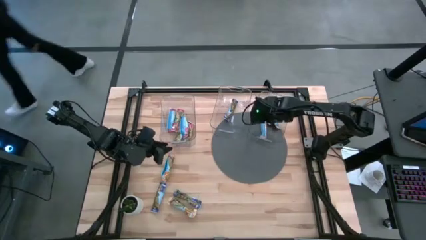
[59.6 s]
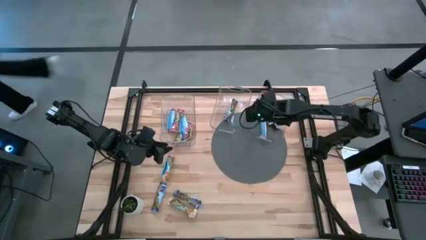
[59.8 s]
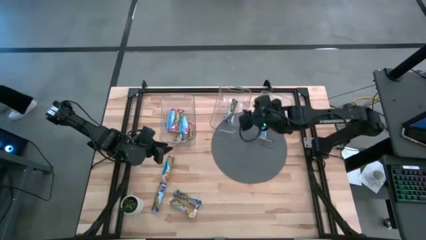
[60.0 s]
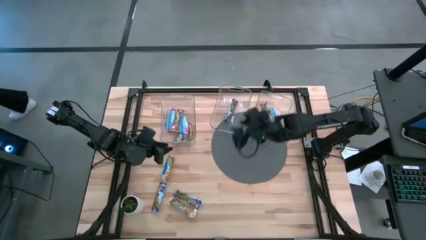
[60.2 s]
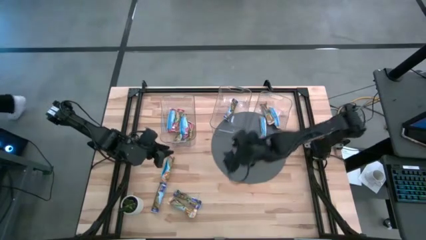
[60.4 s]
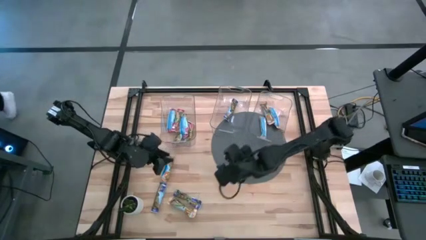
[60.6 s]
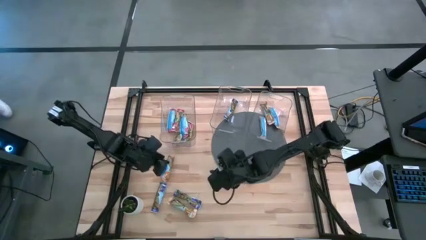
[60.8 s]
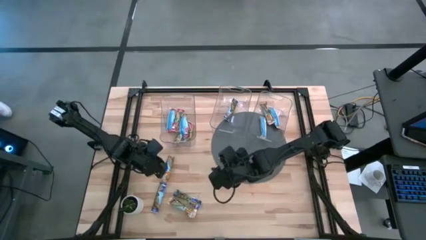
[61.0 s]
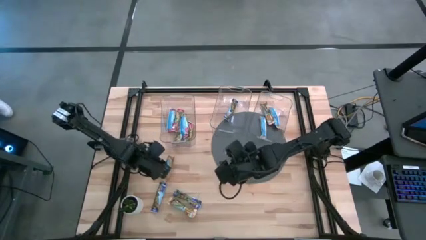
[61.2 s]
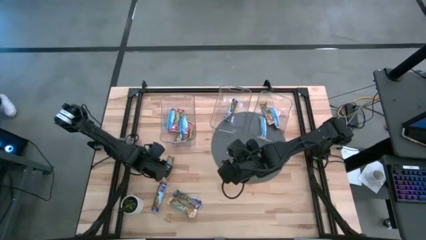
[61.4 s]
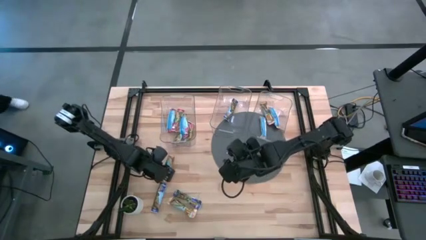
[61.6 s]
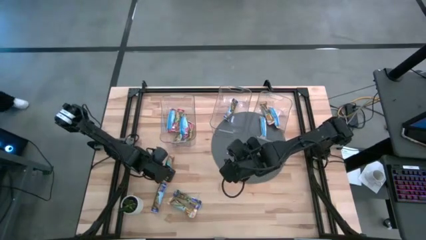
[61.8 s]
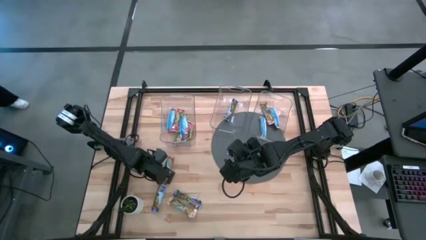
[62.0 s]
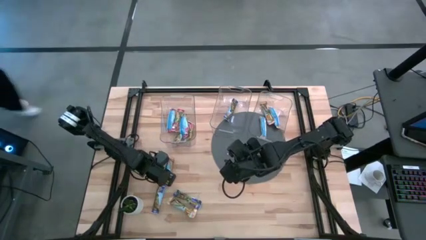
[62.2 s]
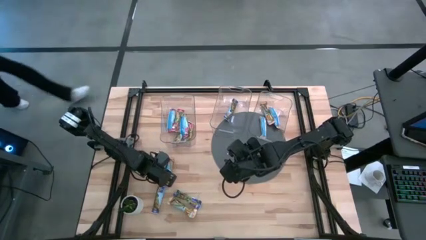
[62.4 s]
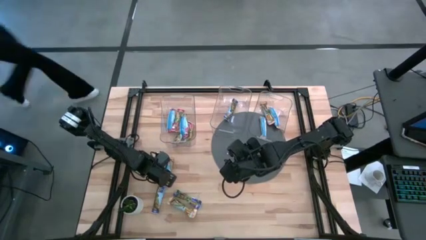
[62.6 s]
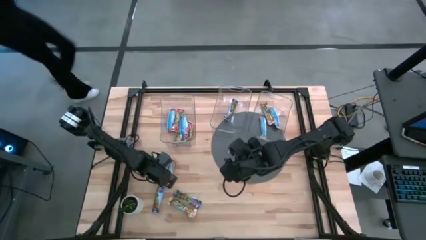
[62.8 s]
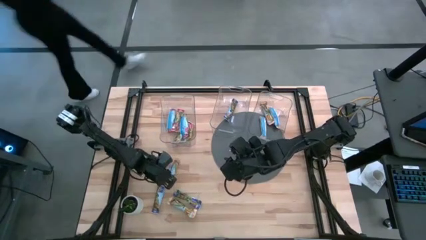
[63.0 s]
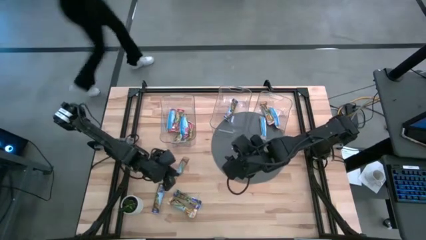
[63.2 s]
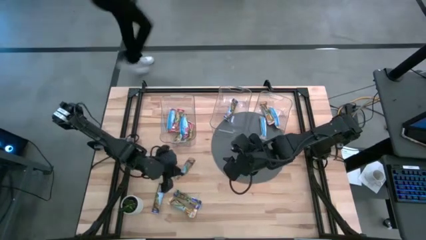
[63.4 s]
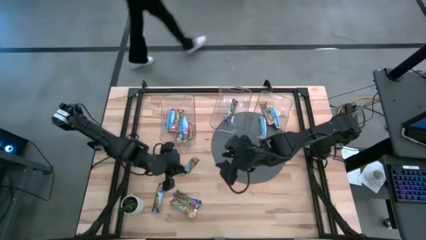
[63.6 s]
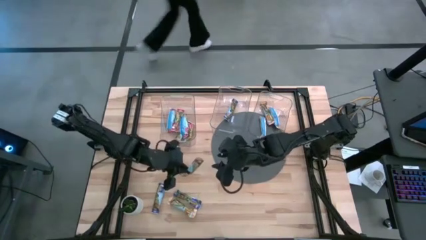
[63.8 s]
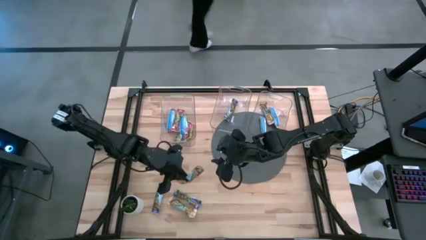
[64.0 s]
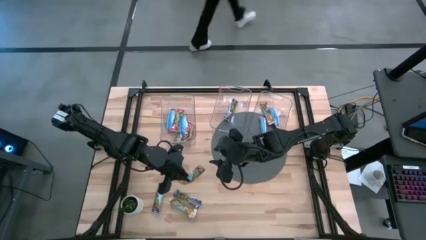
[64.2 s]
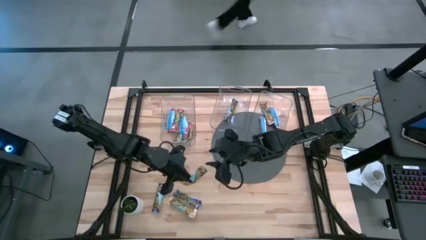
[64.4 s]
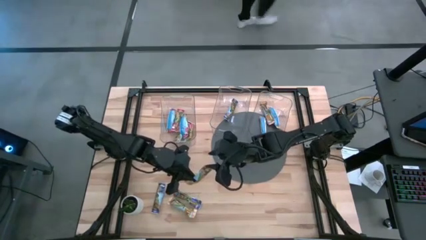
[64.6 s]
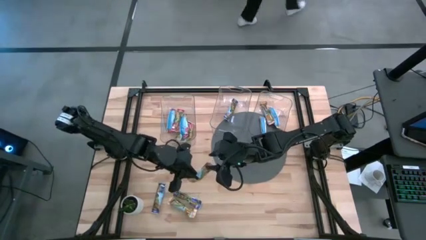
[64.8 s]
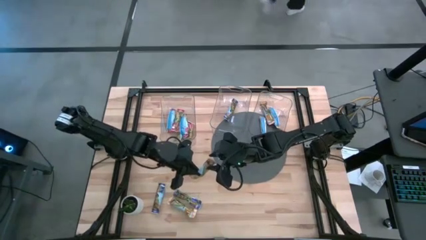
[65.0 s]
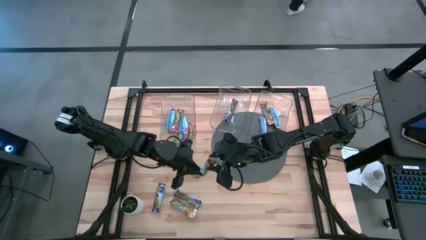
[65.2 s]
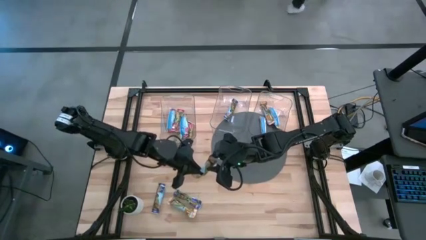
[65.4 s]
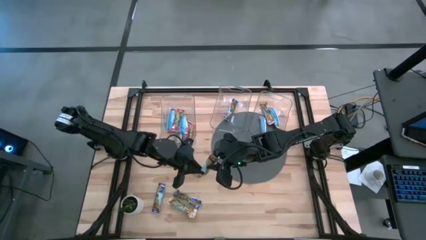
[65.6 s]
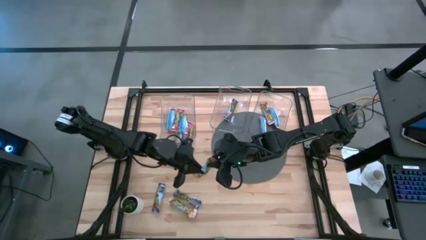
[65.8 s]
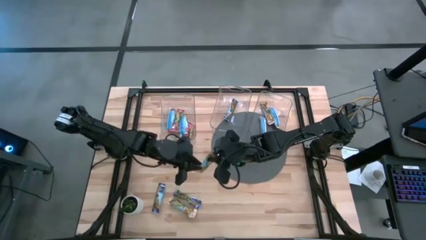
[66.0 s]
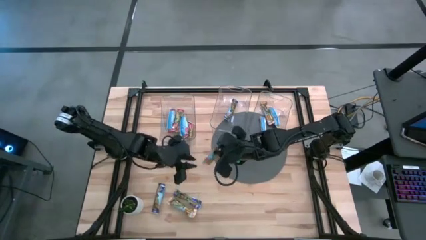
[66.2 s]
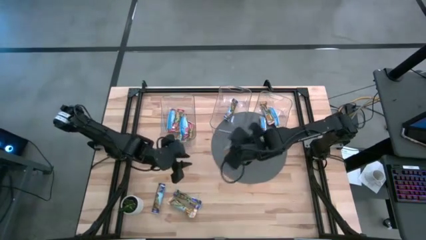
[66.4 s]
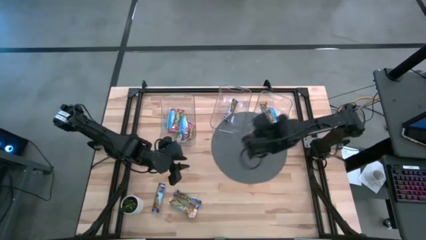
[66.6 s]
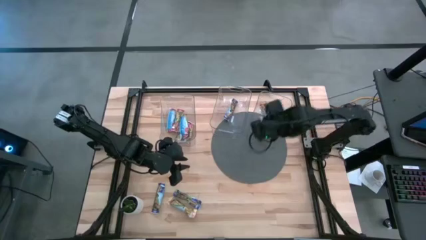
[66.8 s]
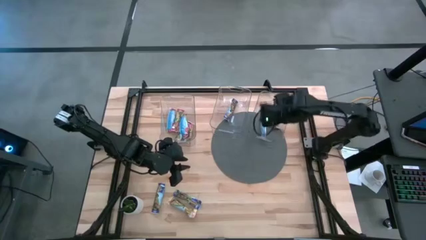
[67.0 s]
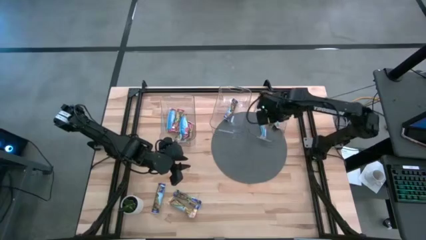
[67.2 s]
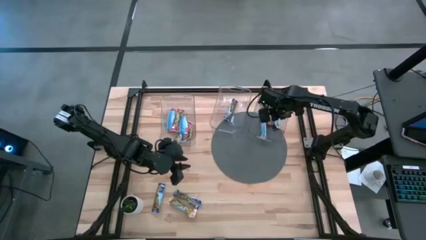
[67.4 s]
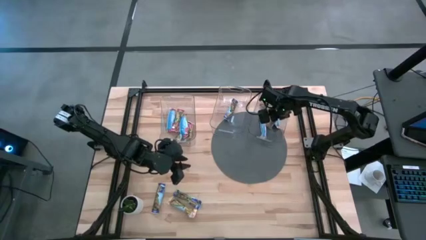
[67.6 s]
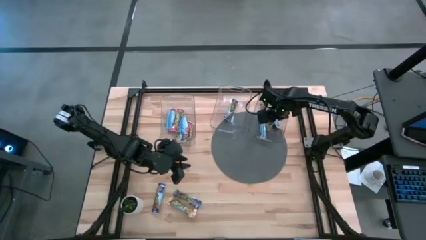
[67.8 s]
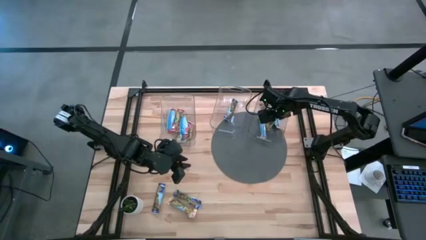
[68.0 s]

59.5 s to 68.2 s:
Task: Pick and place Granola Bars by type
Put the yellow granola bar into the right transparent bin

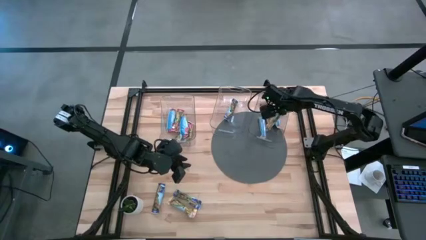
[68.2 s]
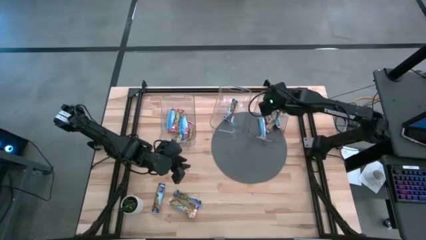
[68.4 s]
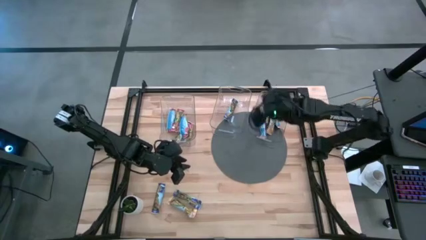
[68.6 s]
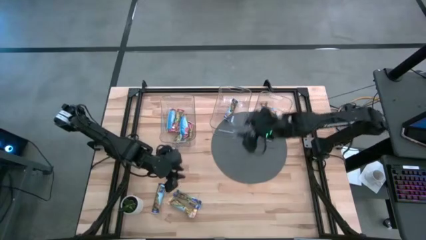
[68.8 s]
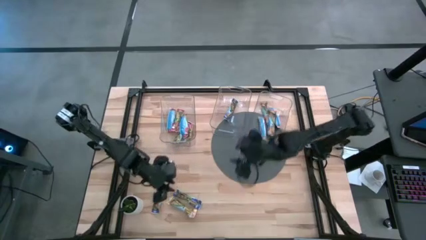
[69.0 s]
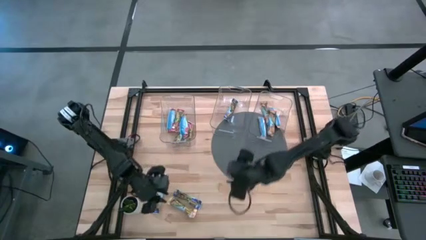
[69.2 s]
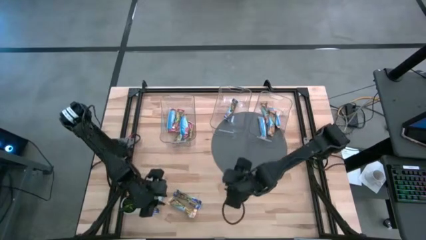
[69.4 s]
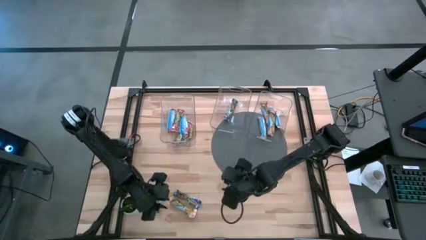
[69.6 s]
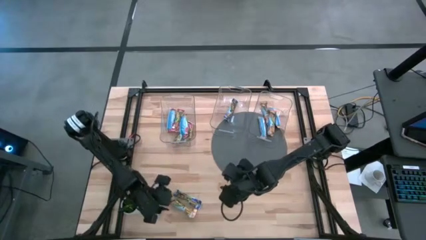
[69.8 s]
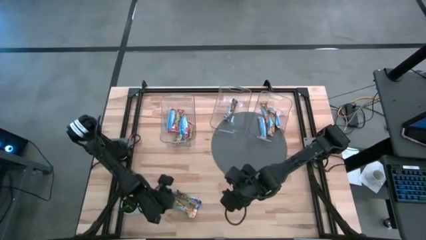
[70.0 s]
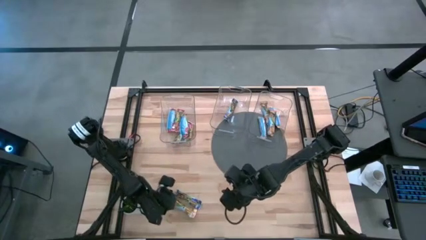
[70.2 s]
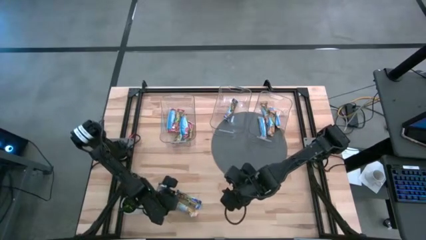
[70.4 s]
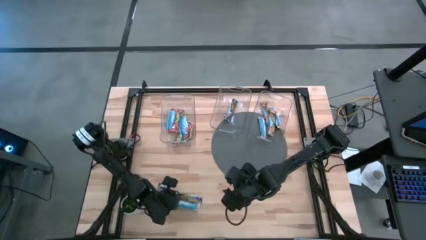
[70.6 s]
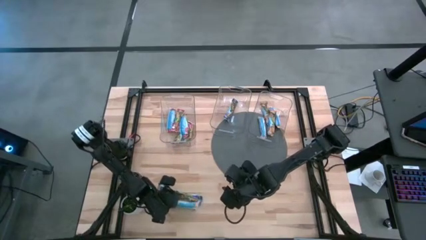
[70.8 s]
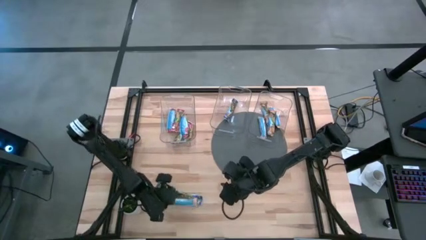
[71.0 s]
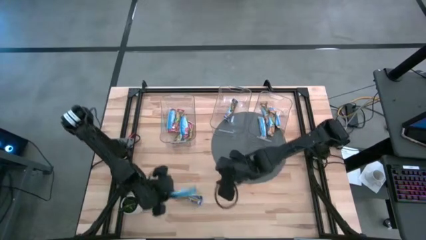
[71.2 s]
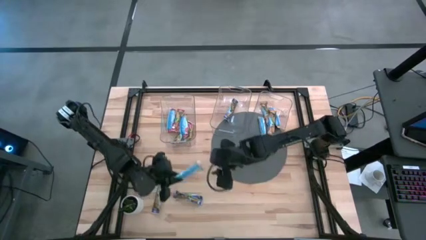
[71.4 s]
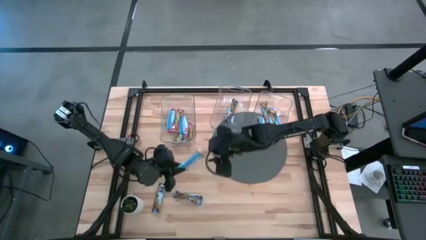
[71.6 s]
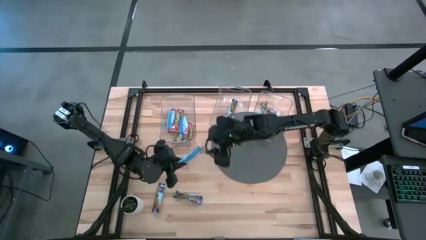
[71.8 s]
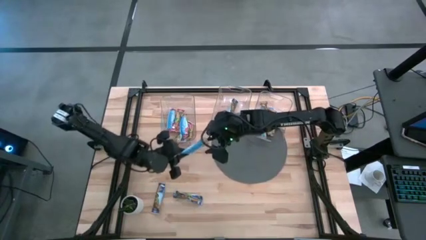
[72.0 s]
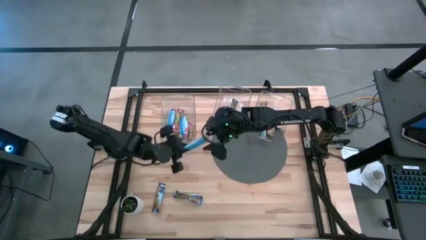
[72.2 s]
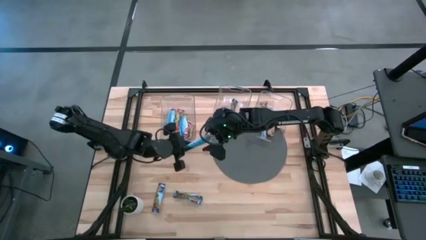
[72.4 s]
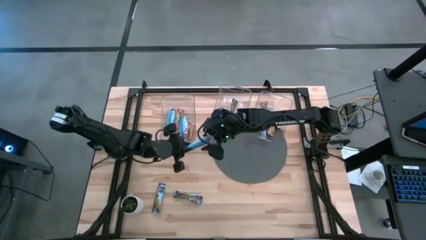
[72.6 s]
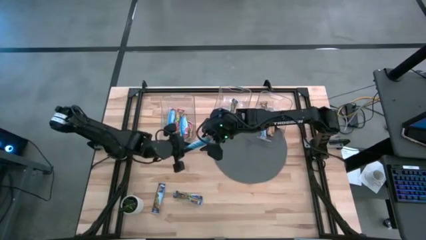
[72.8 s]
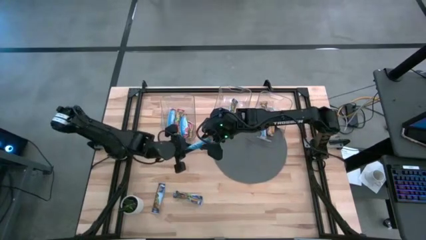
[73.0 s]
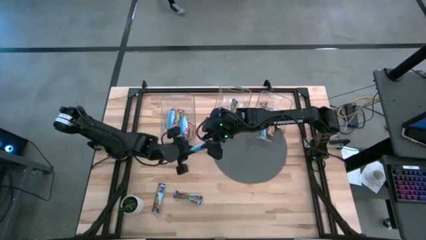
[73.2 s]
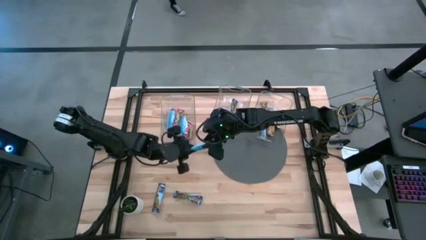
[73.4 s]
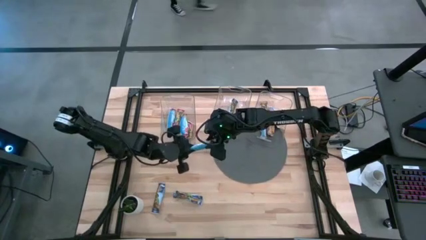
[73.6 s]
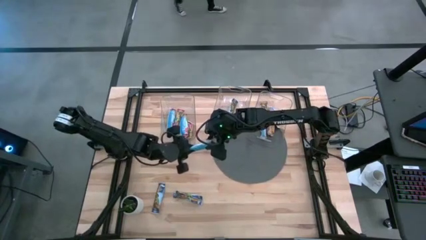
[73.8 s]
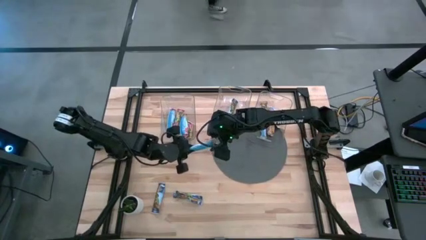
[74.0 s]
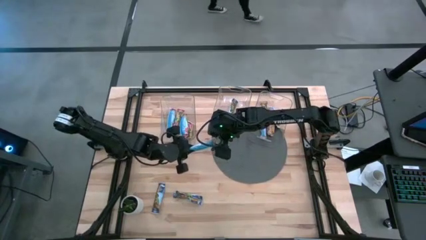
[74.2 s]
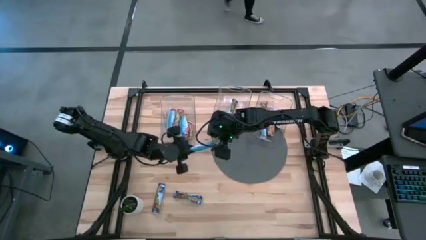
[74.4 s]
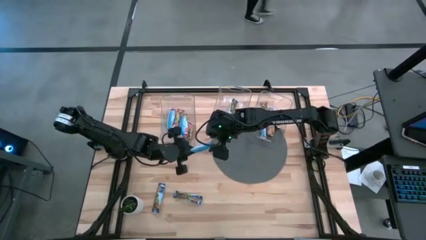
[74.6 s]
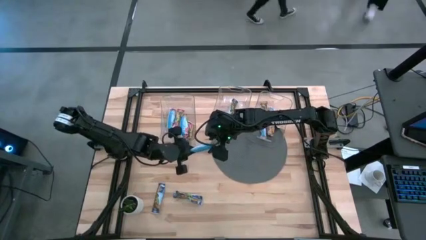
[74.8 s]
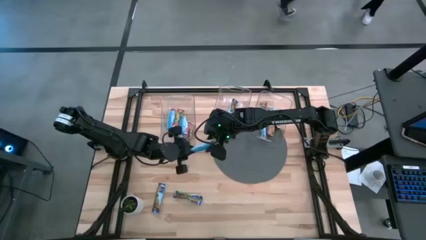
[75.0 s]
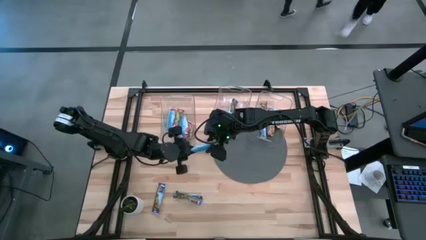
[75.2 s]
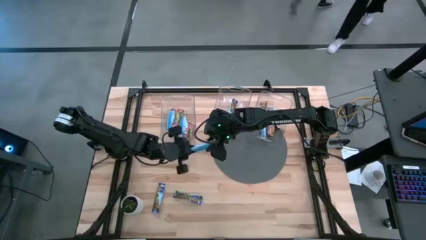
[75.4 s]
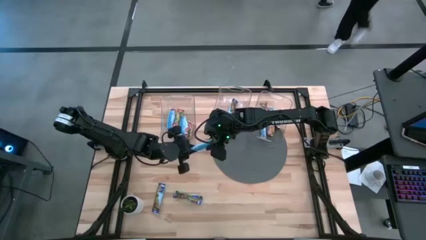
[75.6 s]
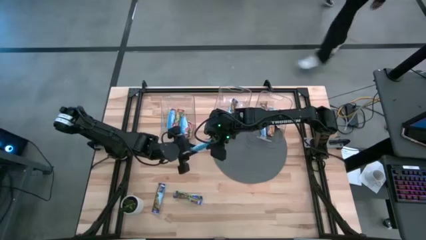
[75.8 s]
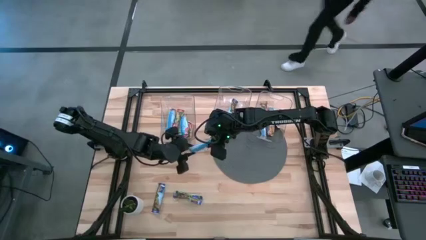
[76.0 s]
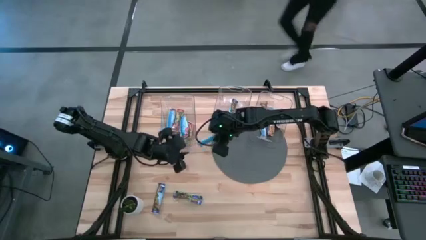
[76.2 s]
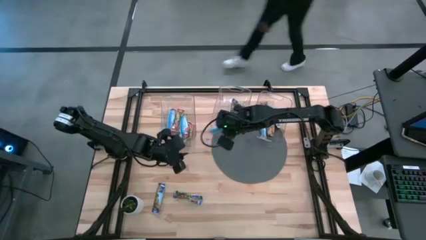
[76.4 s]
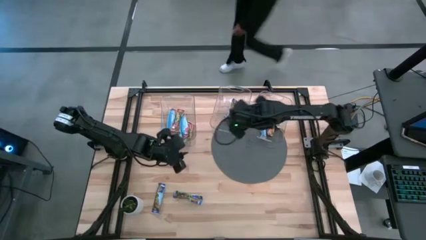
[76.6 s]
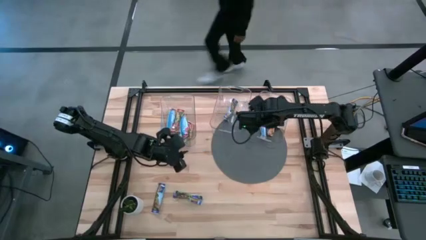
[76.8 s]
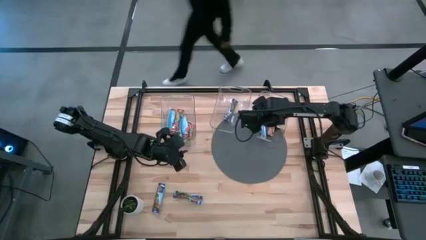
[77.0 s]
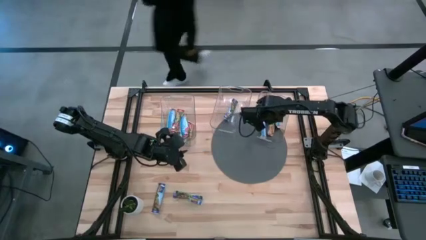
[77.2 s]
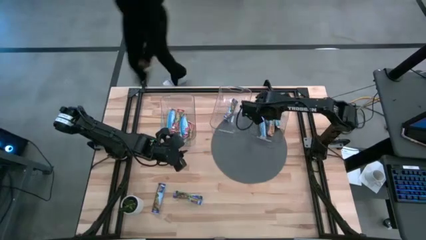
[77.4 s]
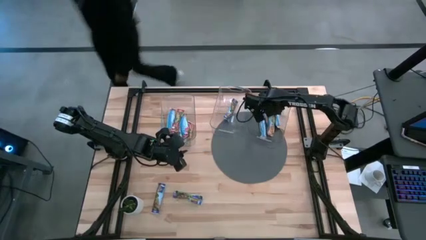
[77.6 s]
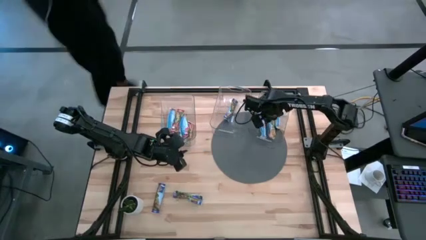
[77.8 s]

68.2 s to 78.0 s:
Put the yellow granola bar into the right transparent bin
